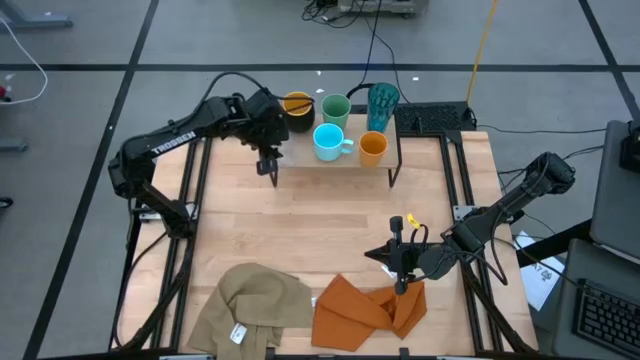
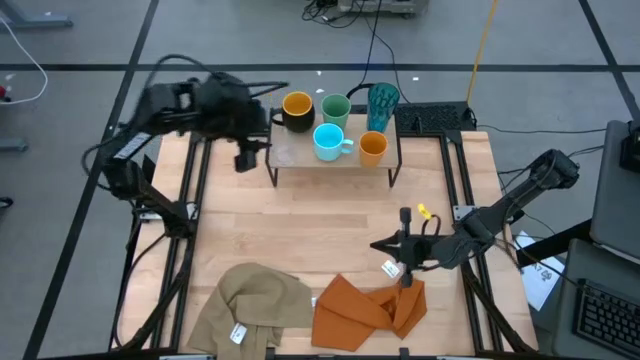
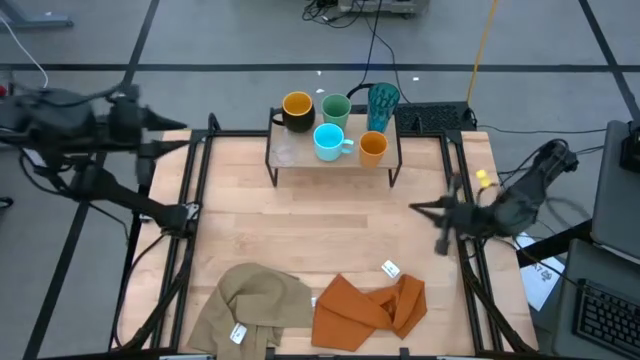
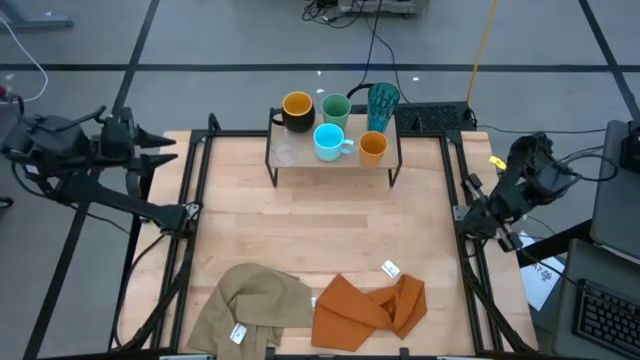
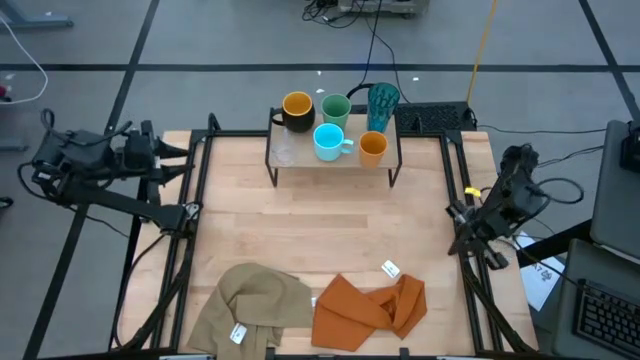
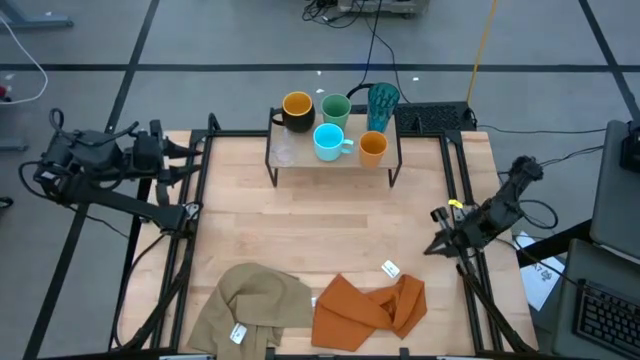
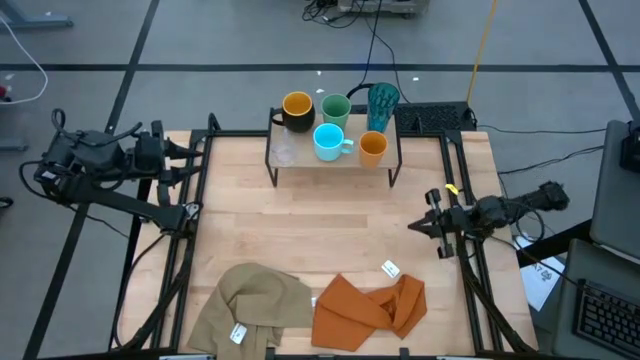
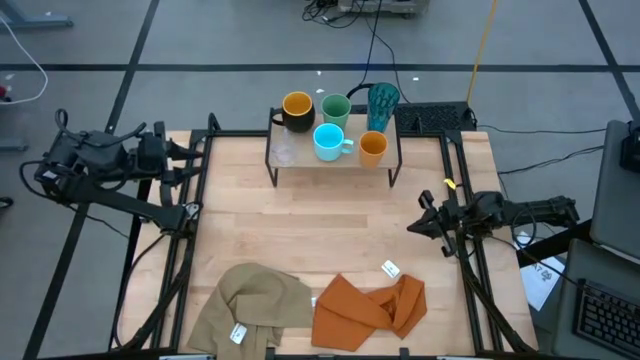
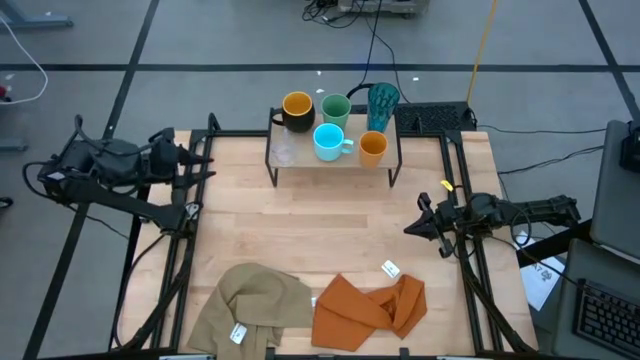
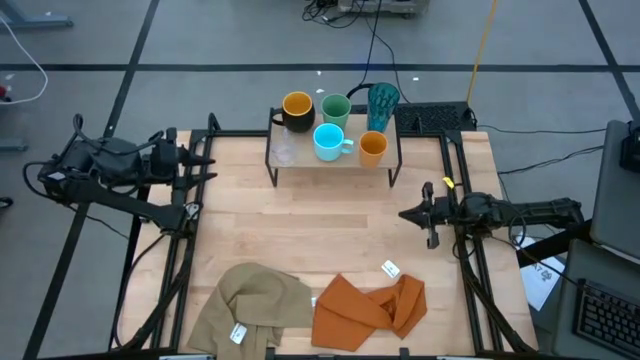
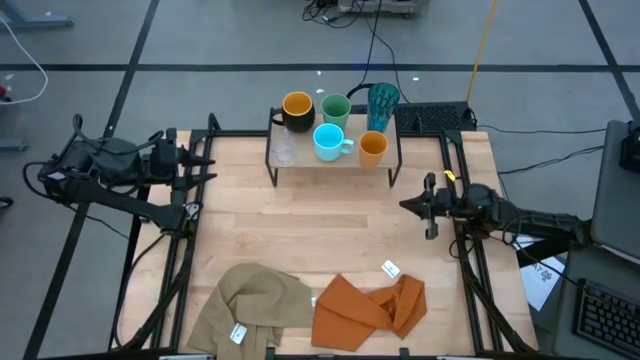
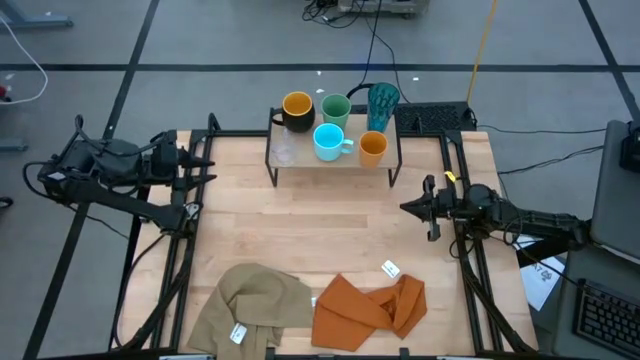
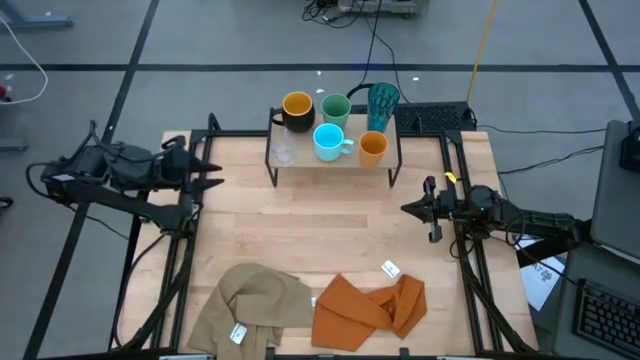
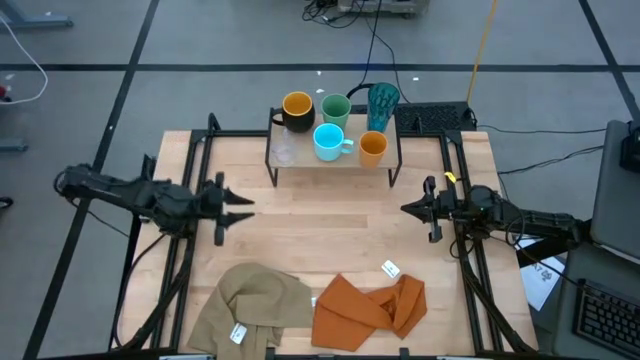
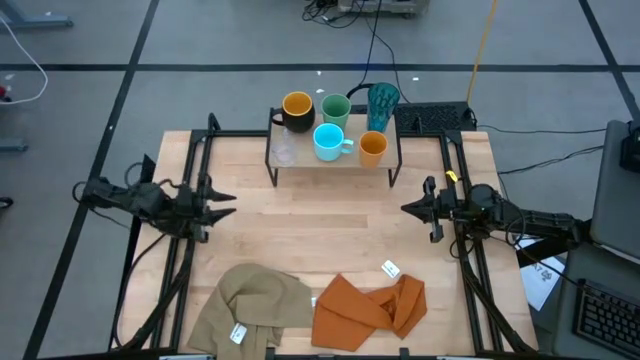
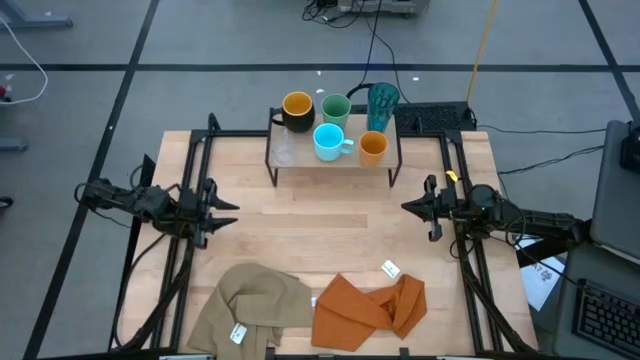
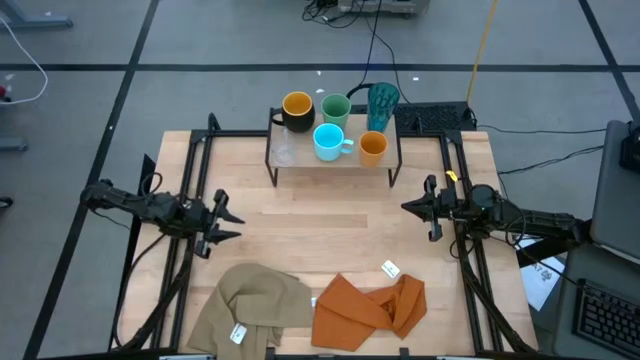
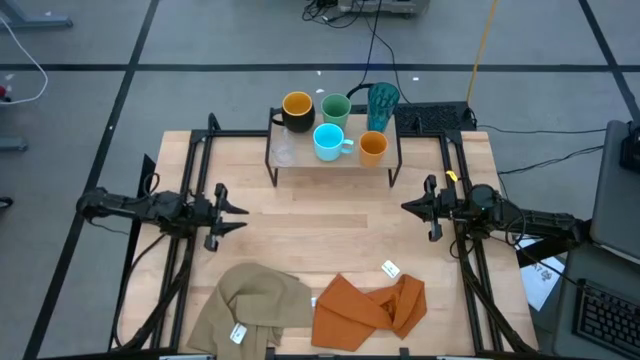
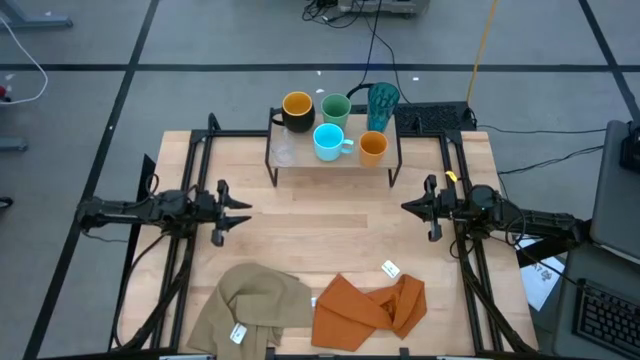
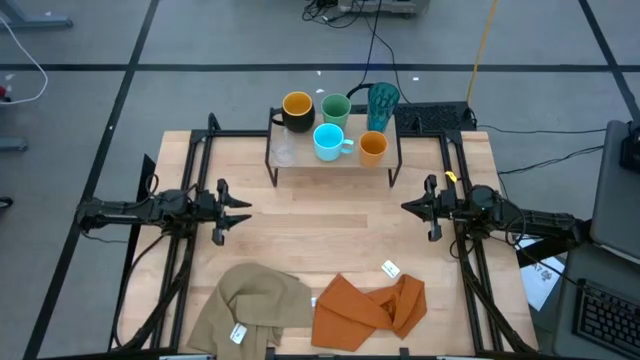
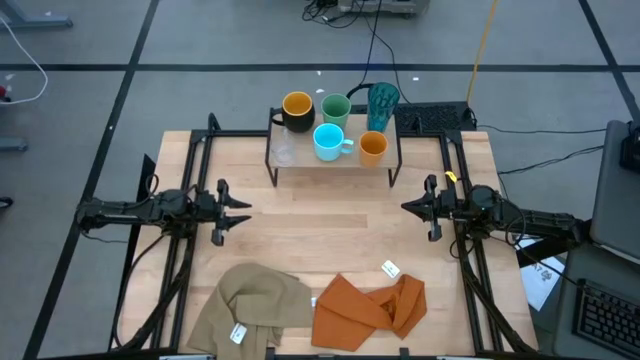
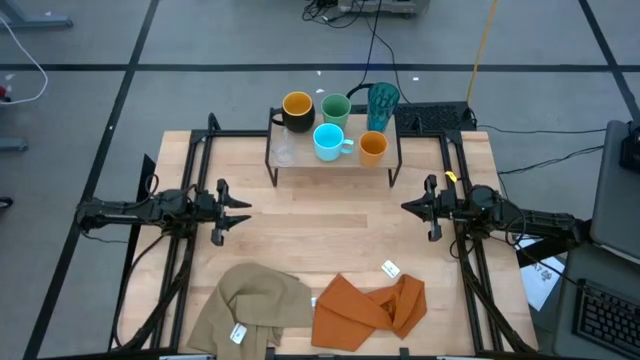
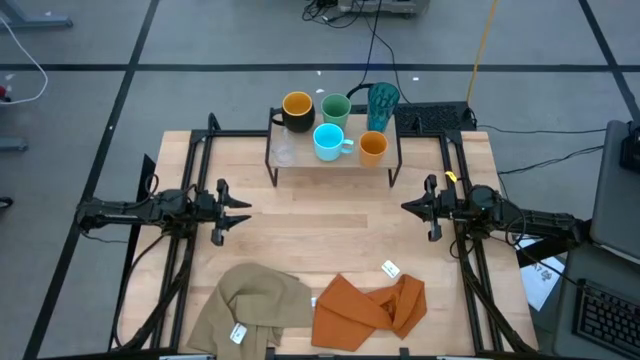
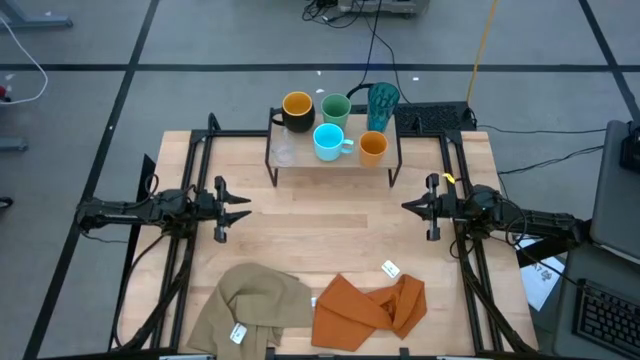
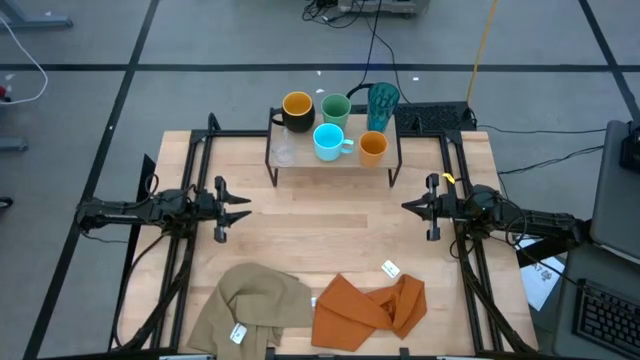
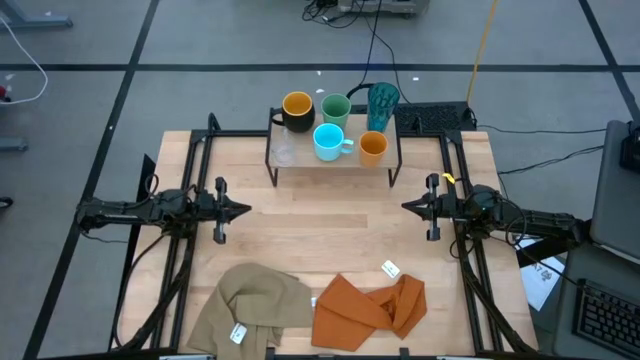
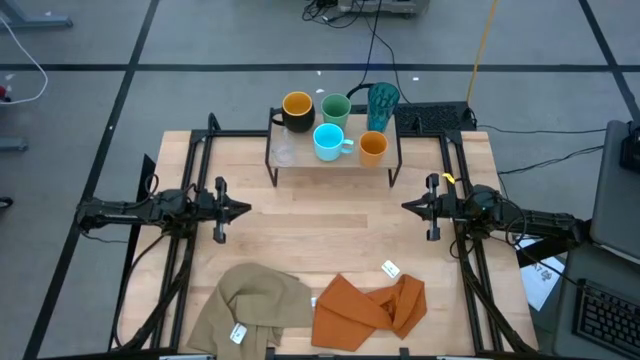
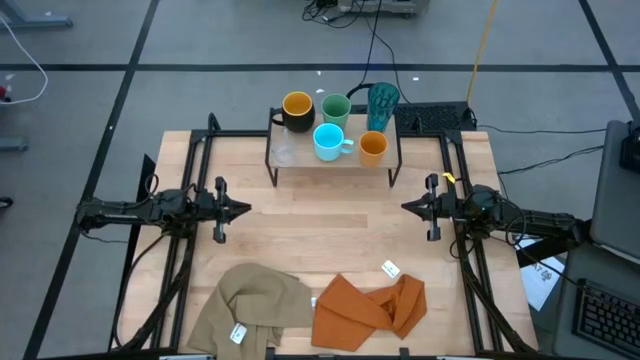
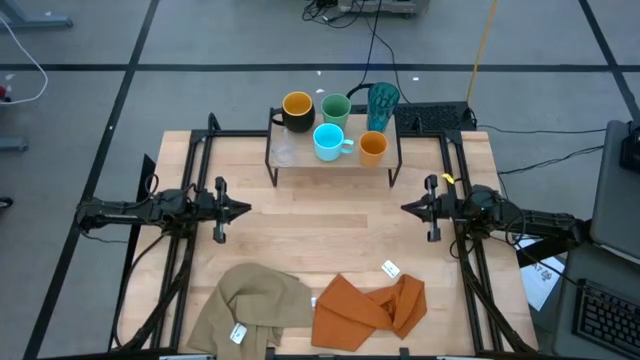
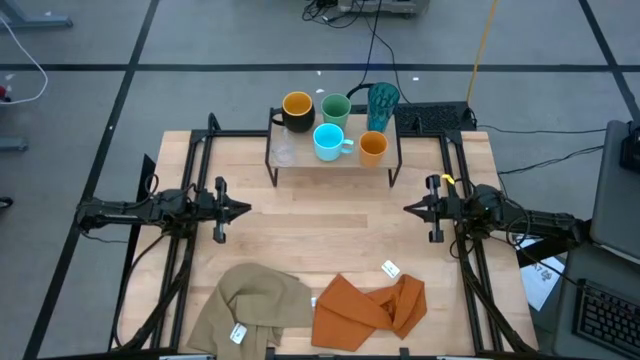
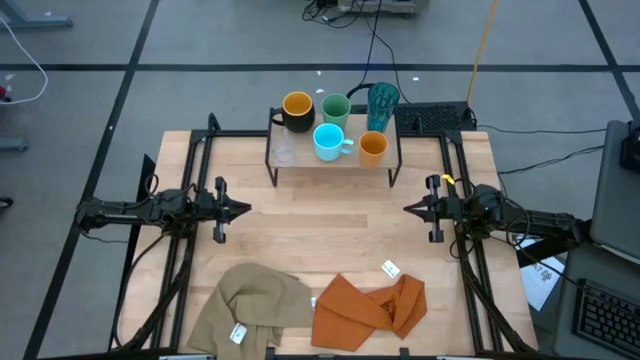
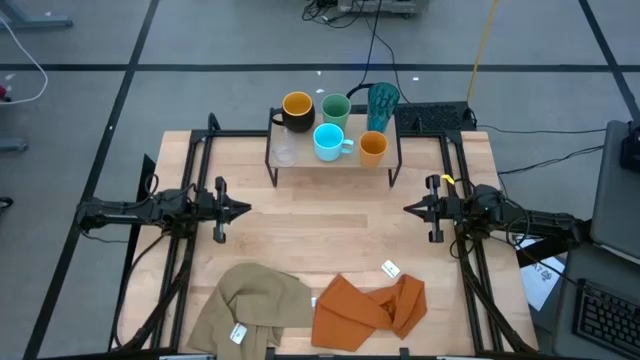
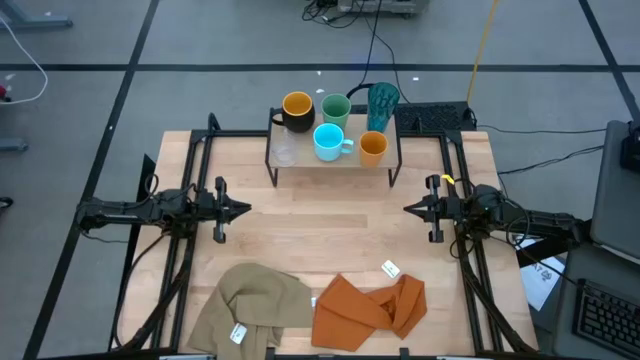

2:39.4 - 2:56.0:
Task: Stack small to large cups/mugs on shelf
Return to Home Position

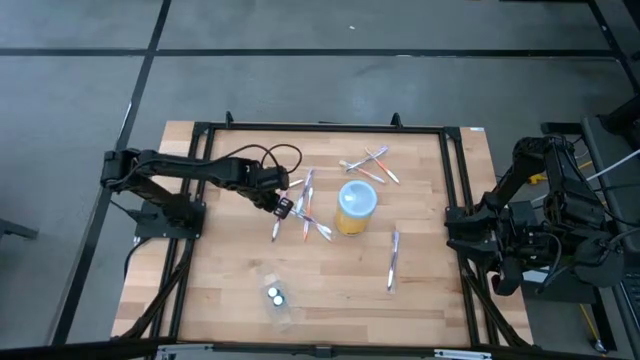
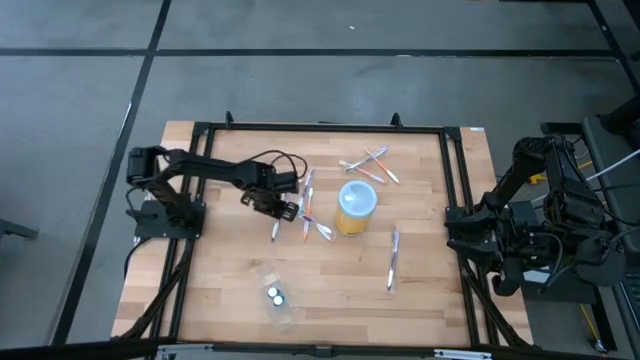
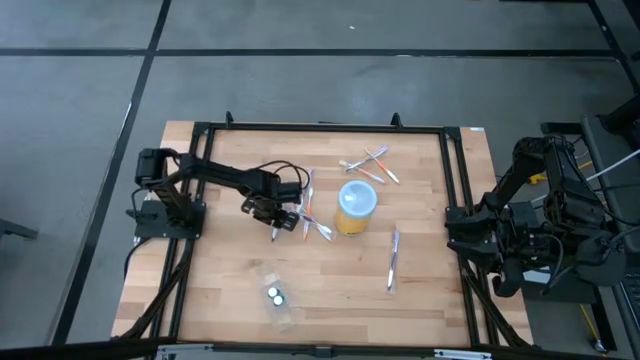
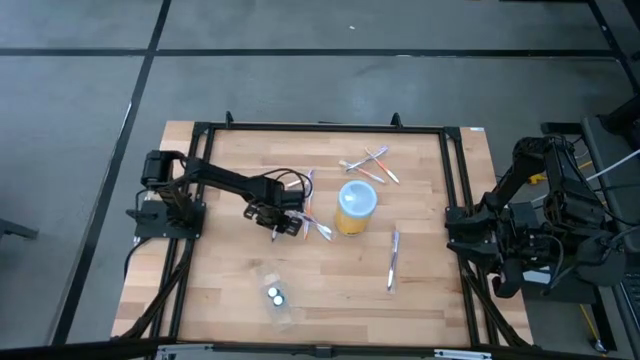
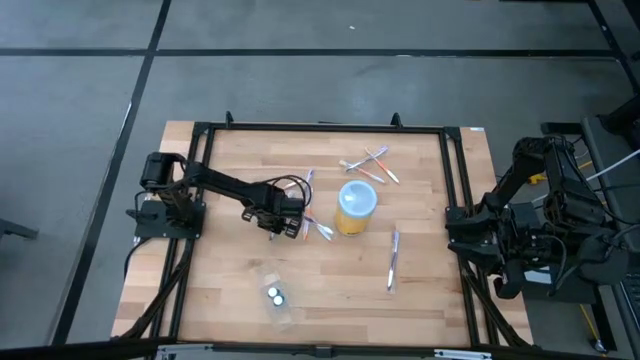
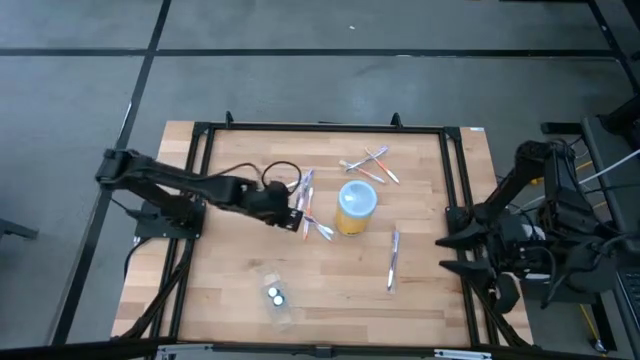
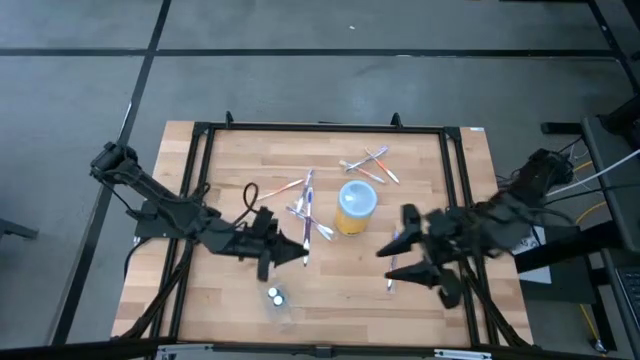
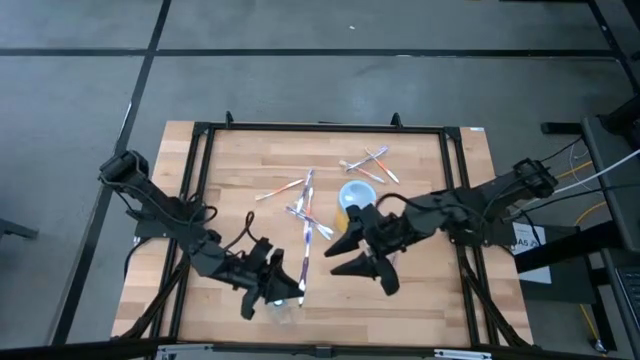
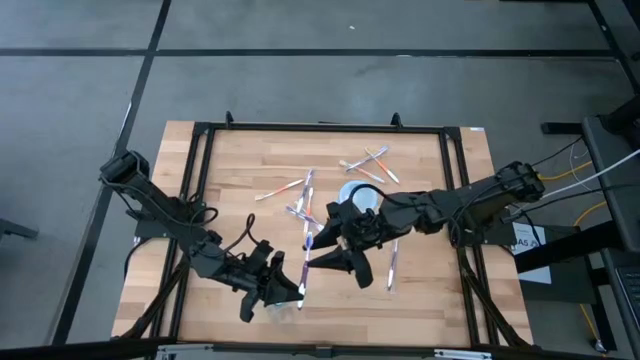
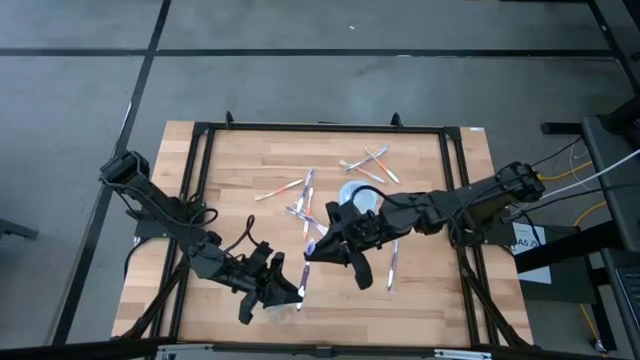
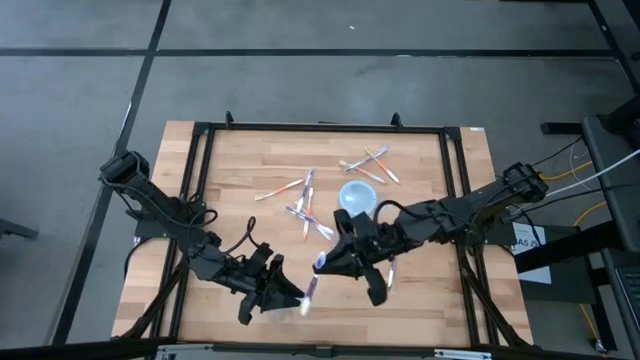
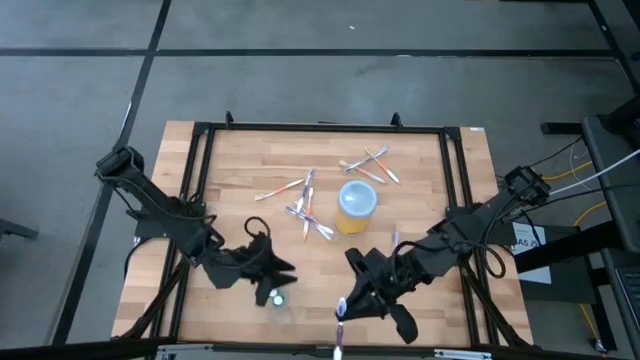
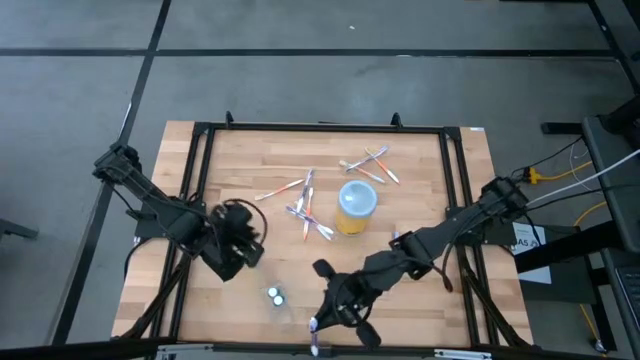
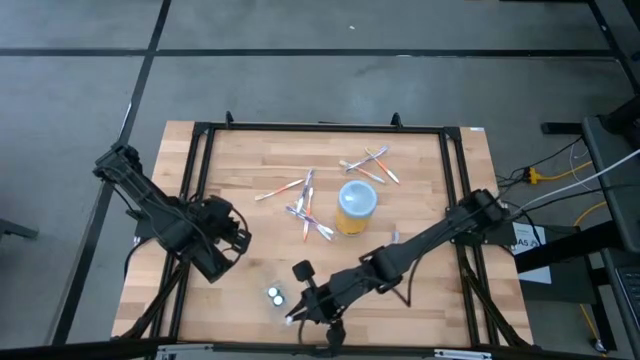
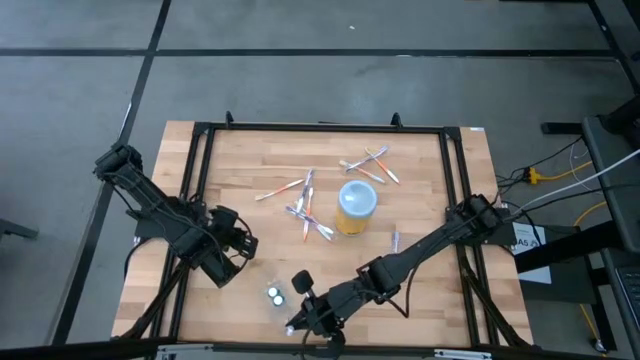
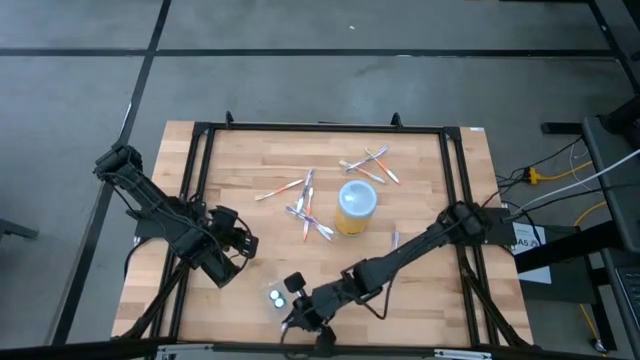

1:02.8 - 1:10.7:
Task: Pick & Place toothbrushing station
Put the violet toothbrush into the right side of the transparent organizer
